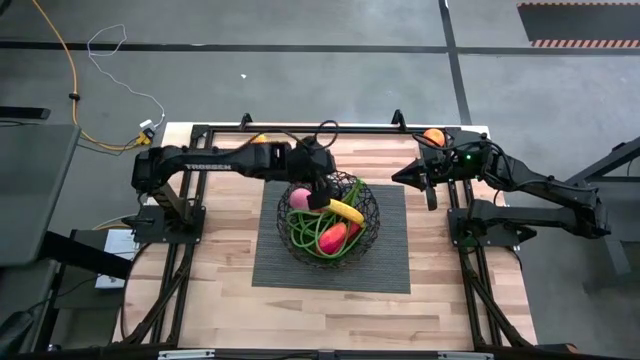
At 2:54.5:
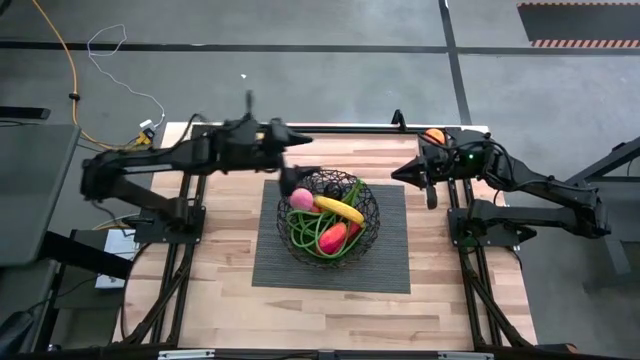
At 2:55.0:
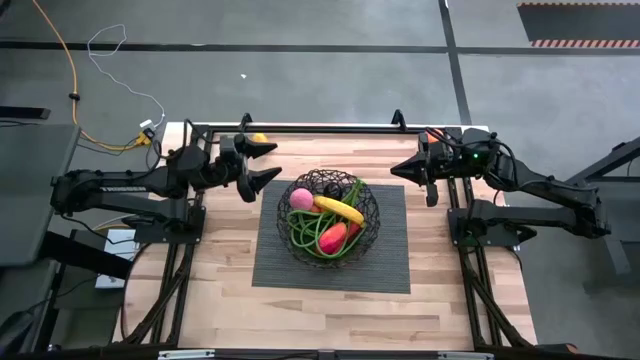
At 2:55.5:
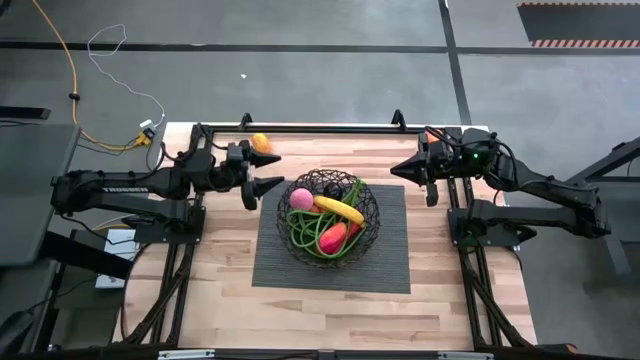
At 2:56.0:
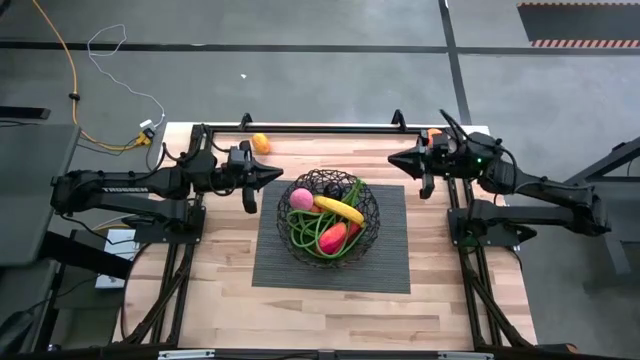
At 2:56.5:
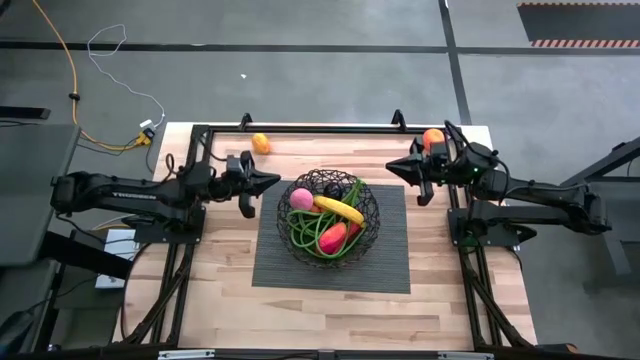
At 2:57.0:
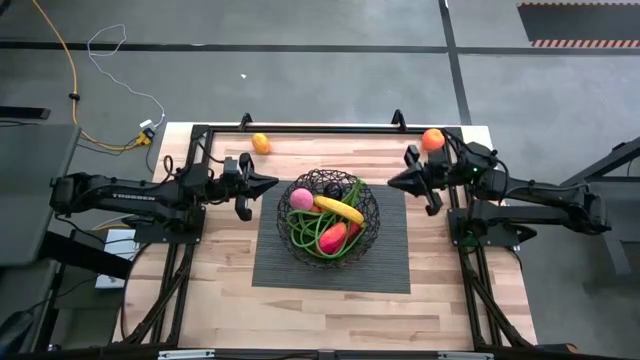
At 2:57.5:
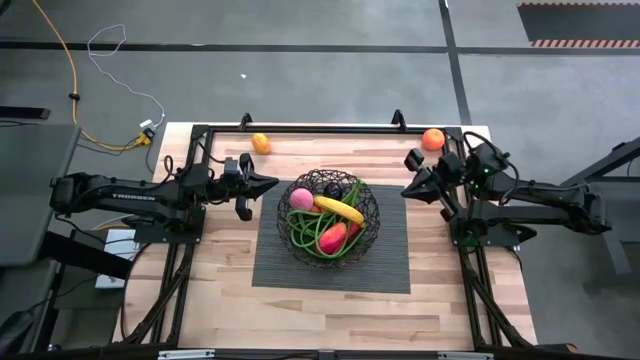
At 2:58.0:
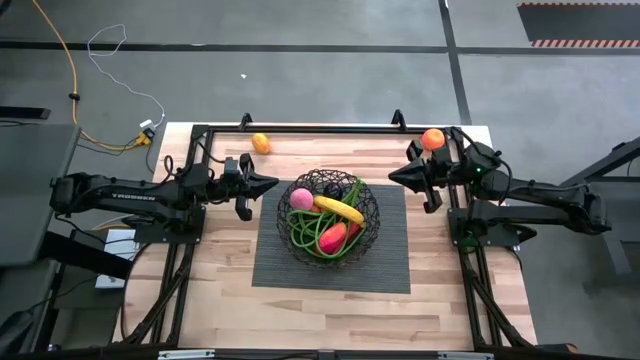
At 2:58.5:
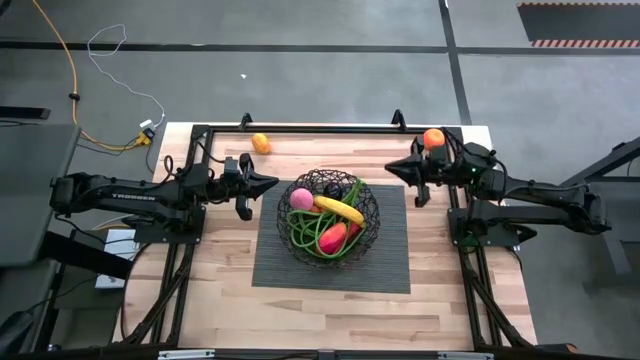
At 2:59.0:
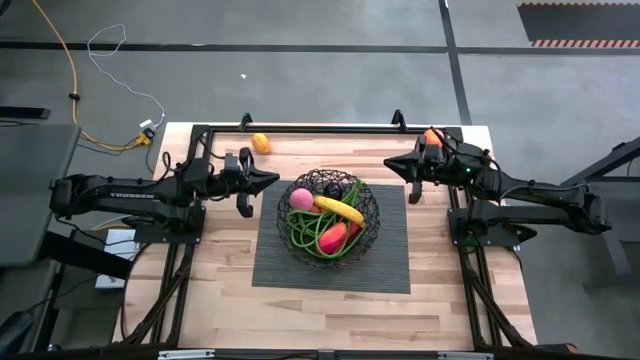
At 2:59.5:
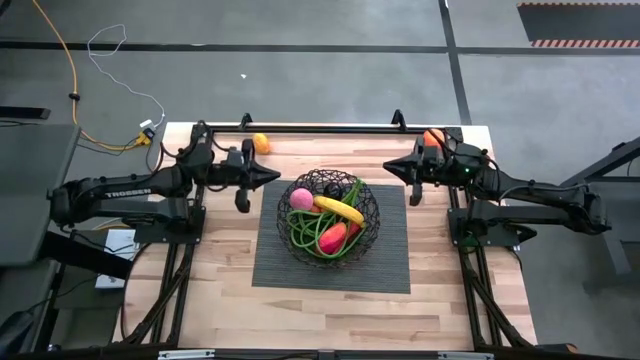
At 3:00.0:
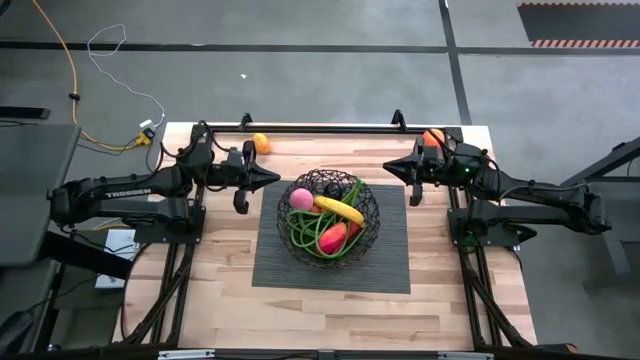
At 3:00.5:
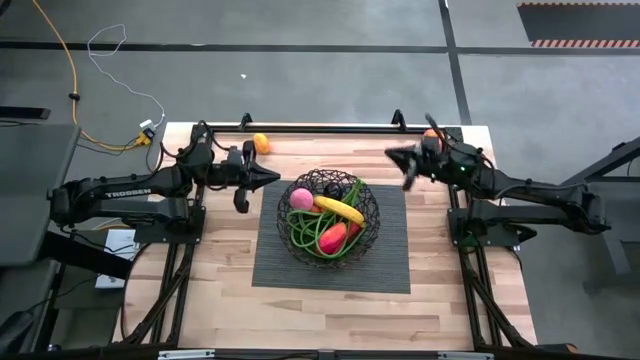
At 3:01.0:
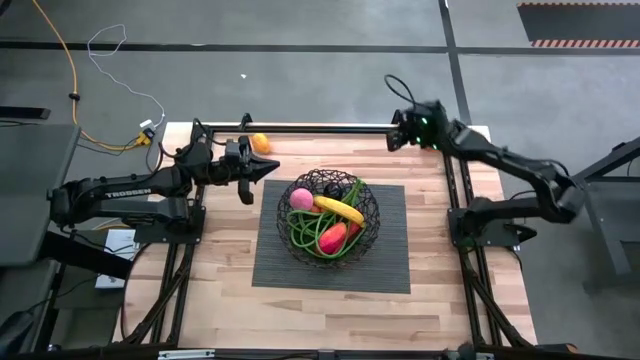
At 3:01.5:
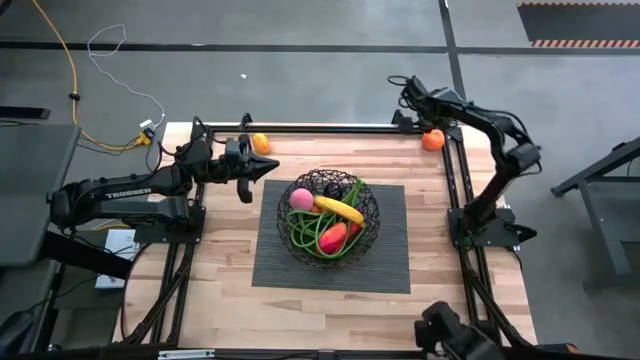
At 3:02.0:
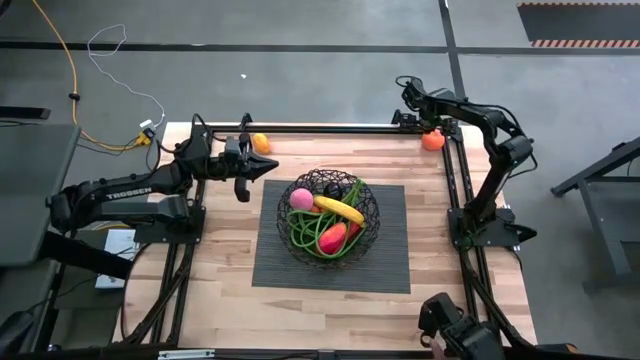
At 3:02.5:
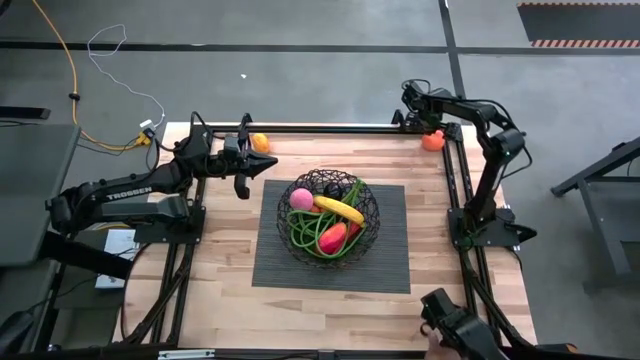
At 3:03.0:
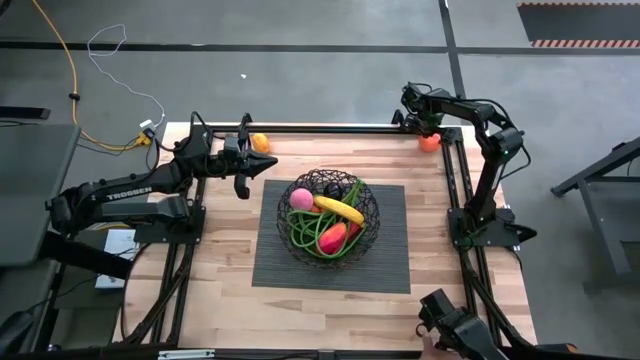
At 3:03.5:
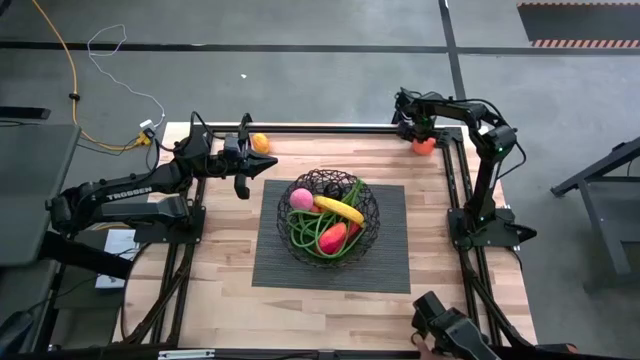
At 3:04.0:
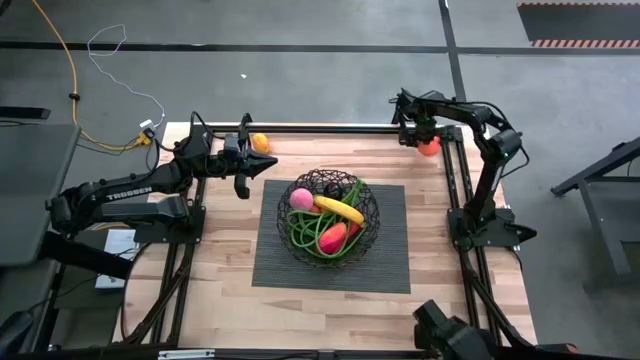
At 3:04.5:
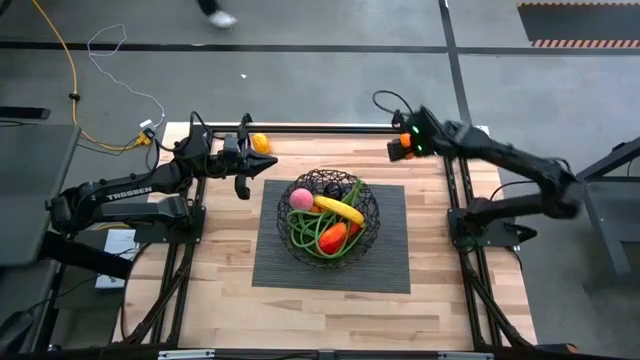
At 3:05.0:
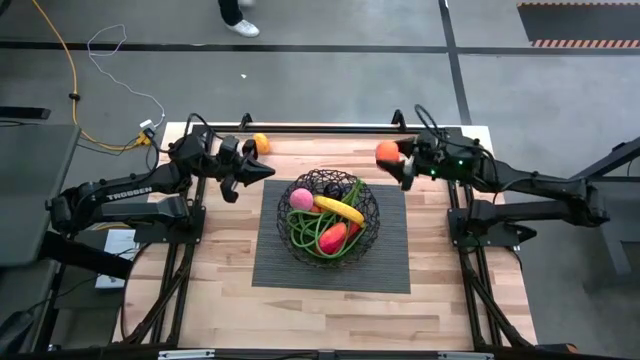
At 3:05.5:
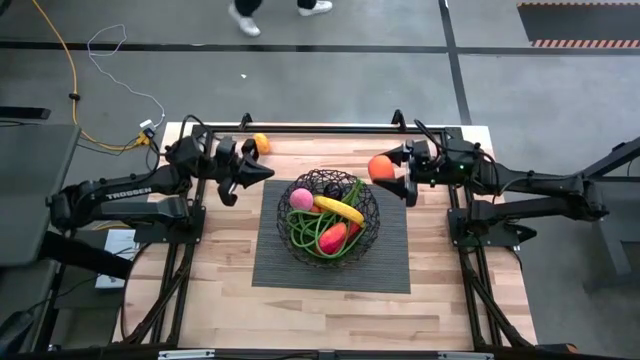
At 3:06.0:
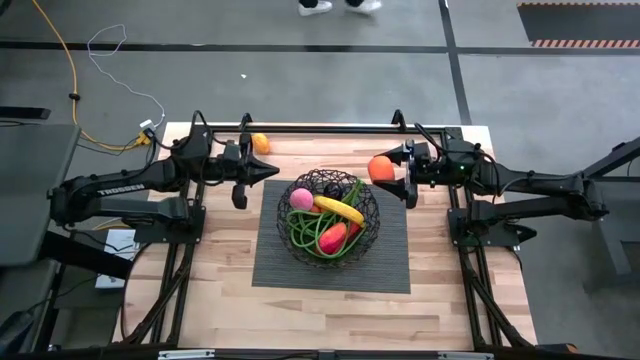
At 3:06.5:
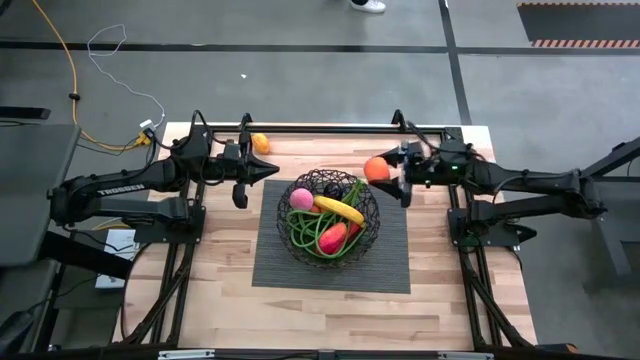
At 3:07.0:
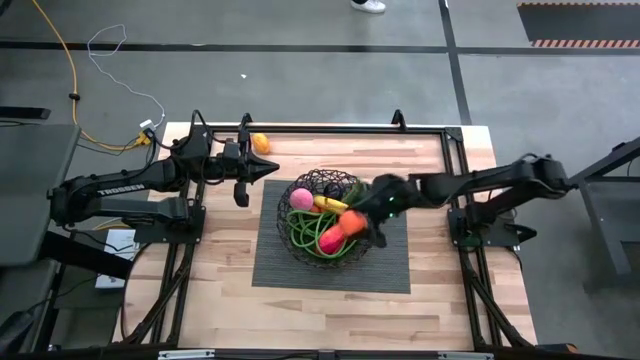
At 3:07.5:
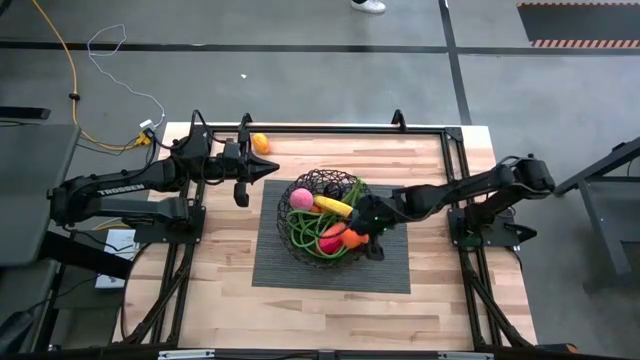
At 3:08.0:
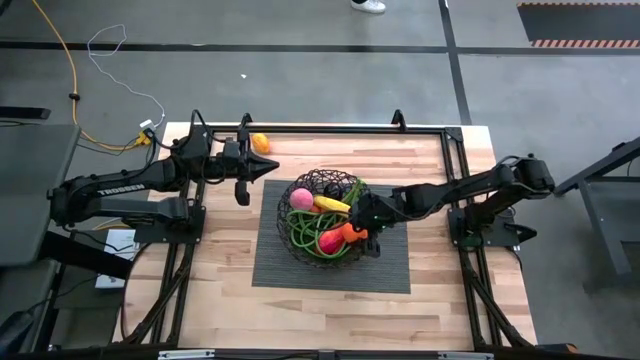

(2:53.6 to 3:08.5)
Task: Build produce basket
Put the orange into the black wire basket

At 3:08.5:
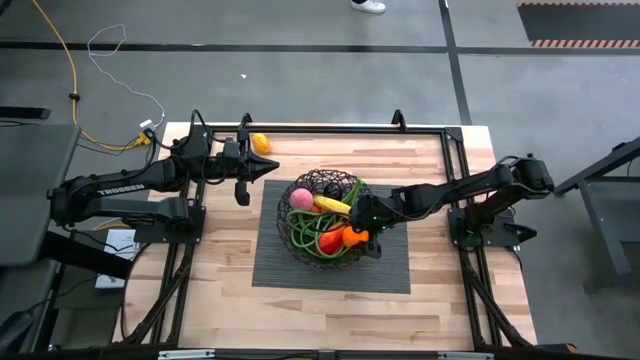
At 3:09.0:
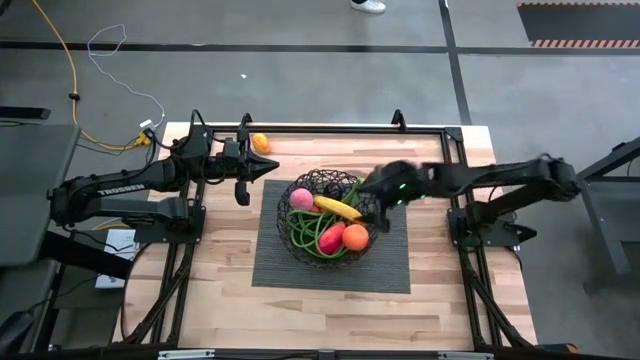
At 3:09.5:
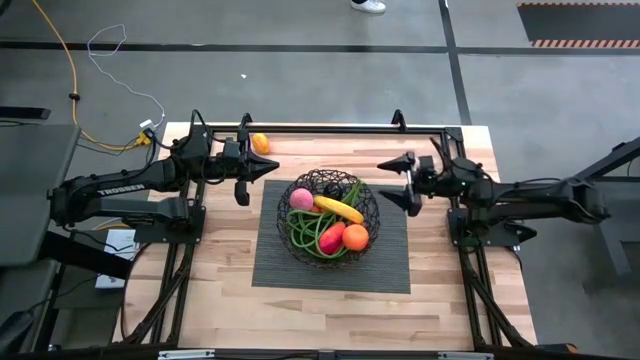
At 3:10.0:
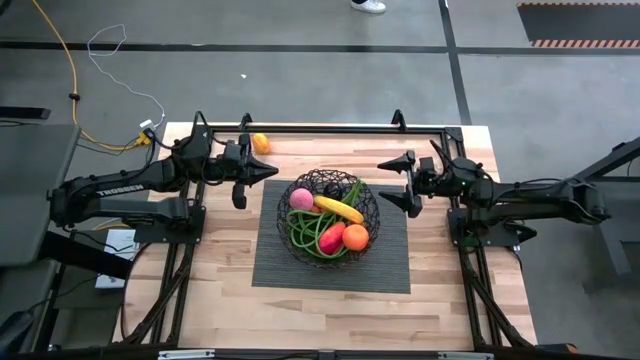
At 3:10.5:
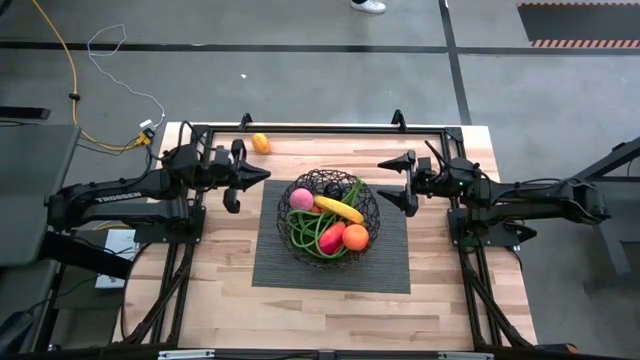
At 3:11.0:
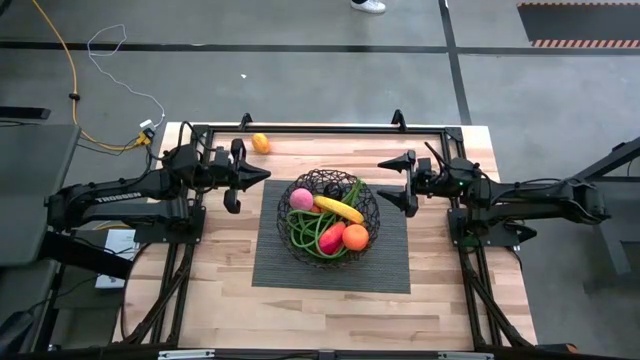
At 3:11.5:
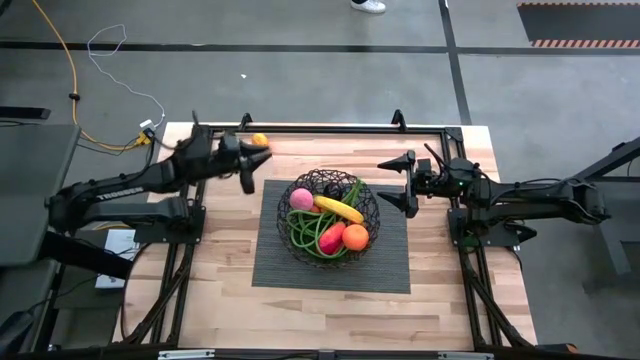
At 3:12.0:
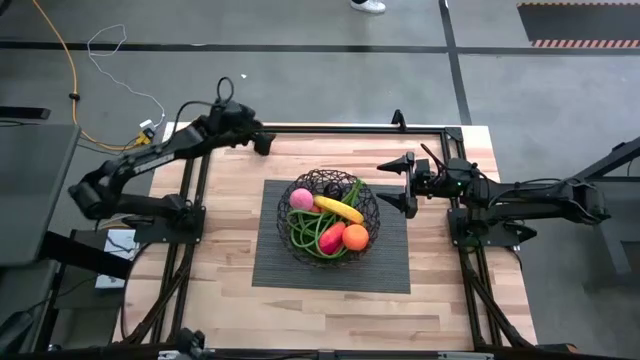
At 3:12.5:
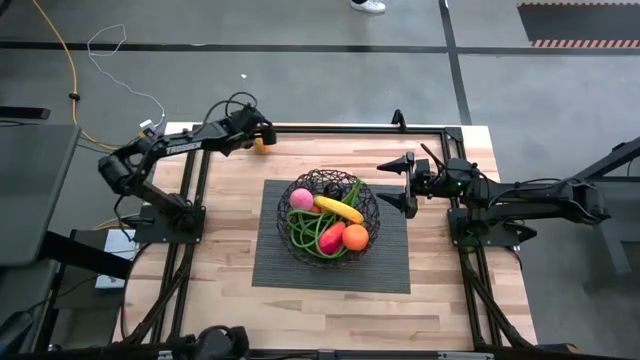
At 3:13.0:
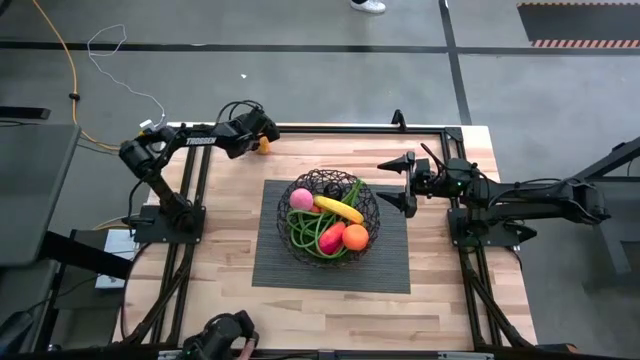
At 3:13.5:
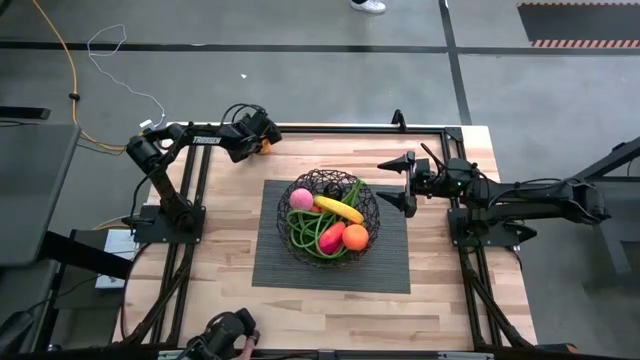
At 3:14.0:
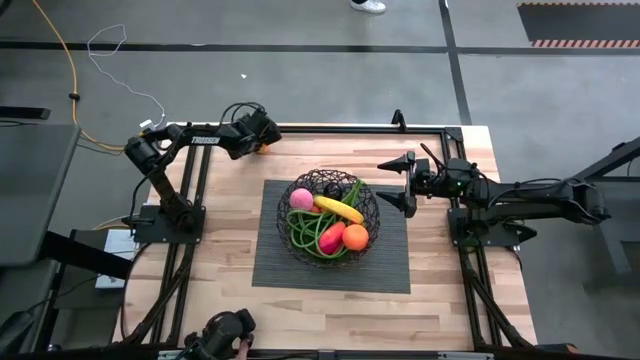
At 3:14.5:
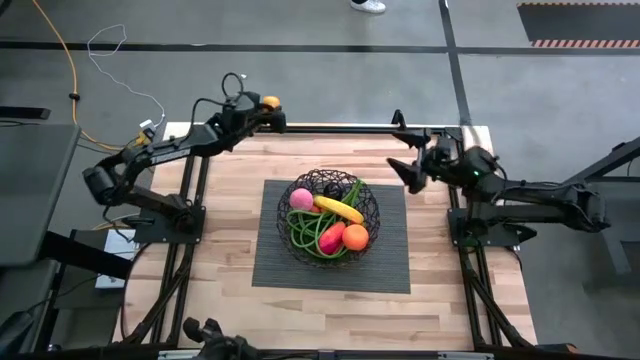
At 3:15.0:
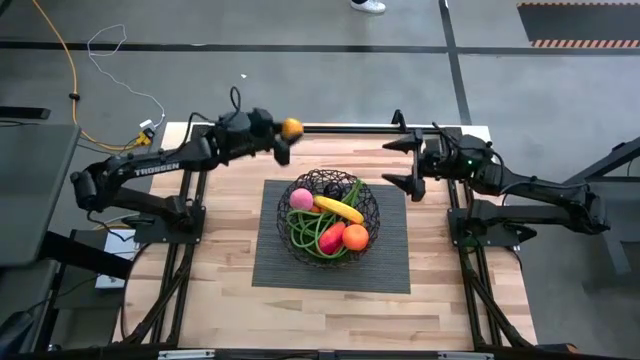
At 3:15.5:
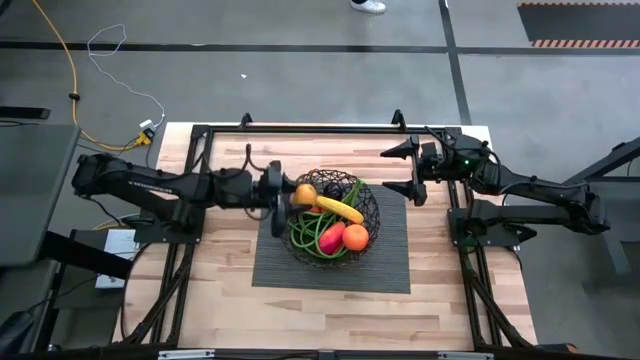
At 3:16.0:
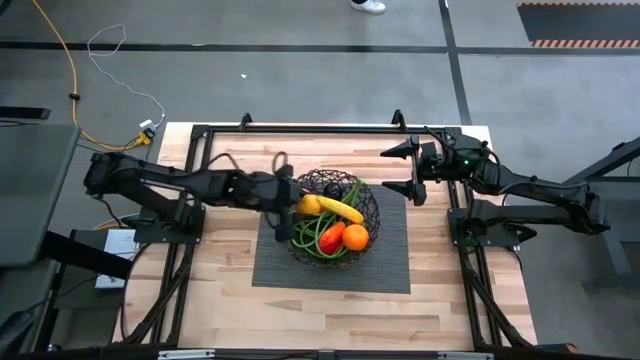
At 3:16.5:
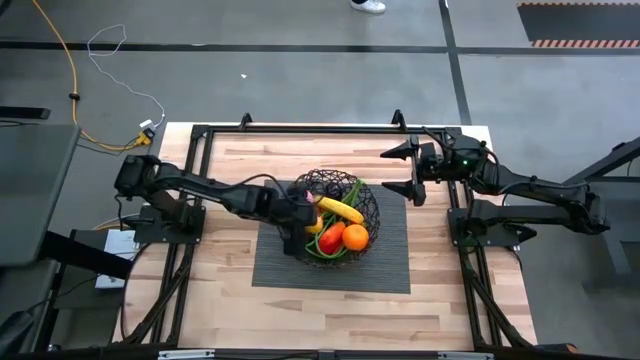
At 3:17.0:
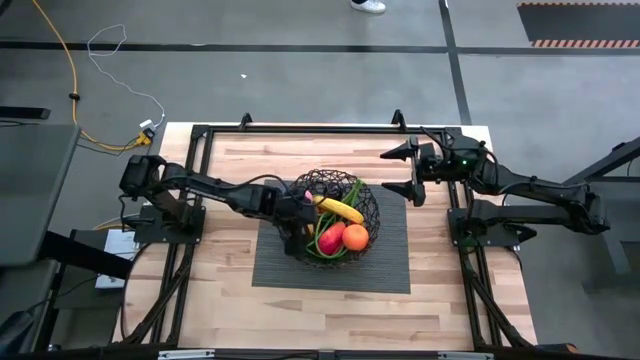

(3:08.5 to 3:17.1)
Put the yellow lemon into the black wire basket
